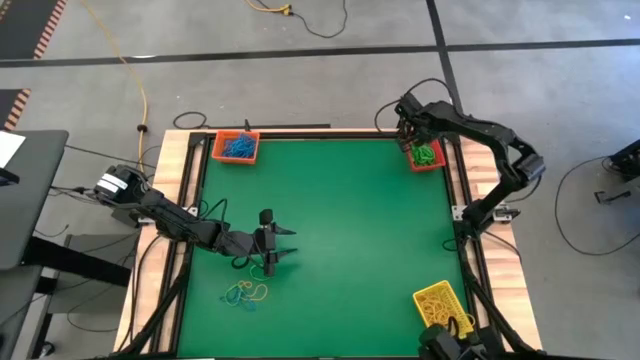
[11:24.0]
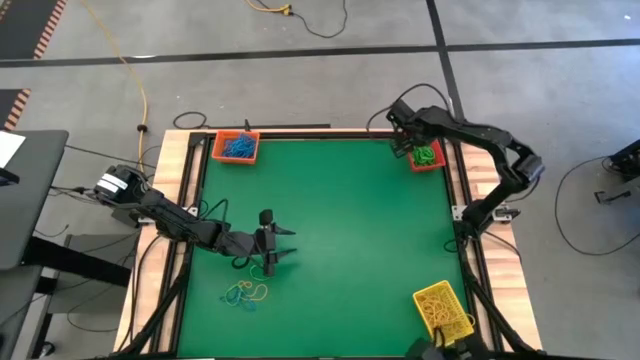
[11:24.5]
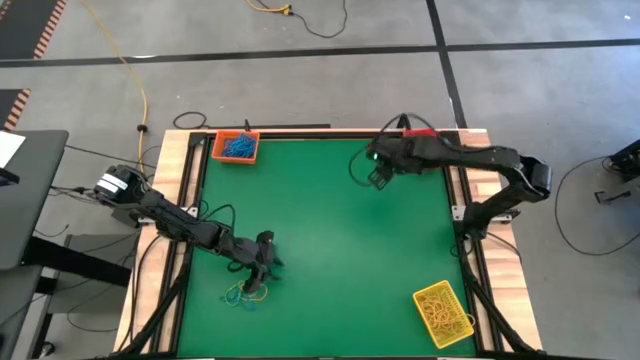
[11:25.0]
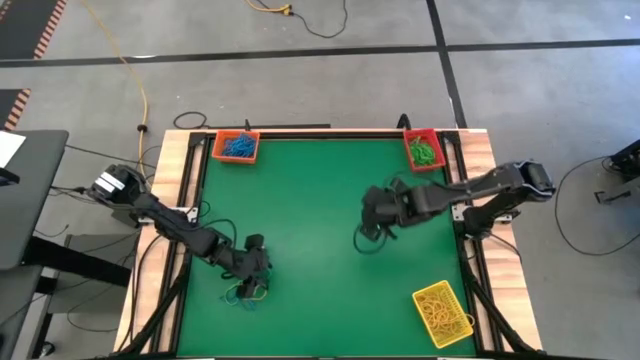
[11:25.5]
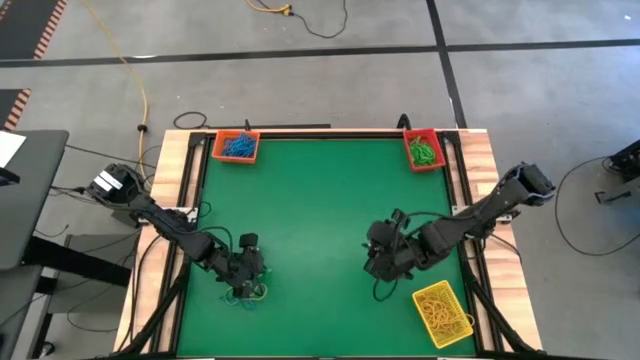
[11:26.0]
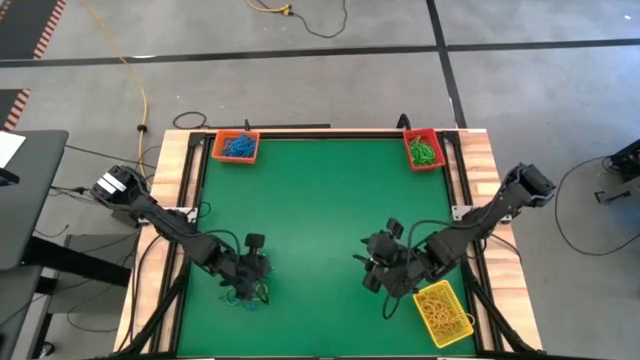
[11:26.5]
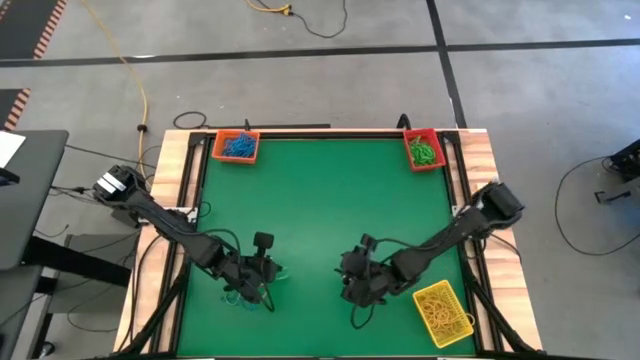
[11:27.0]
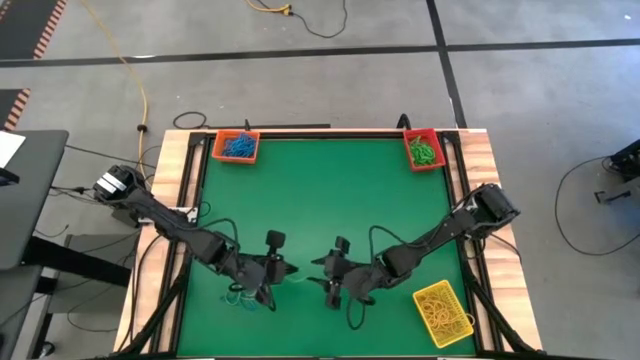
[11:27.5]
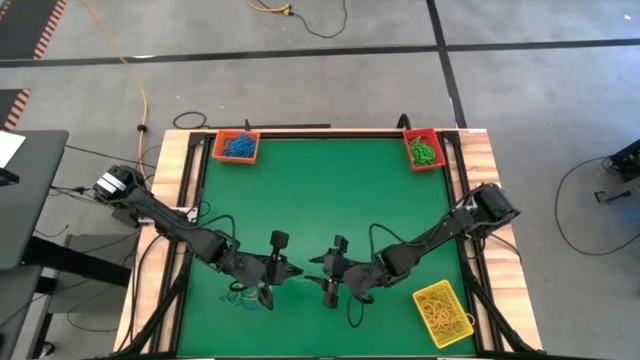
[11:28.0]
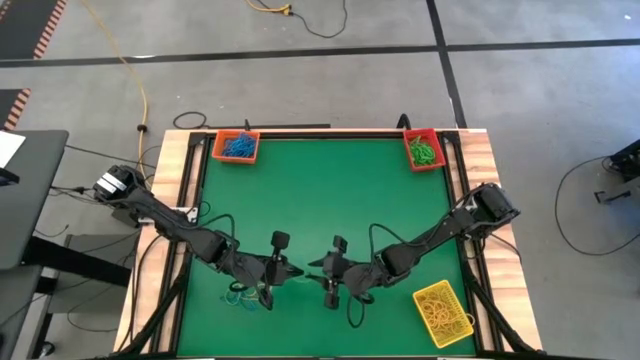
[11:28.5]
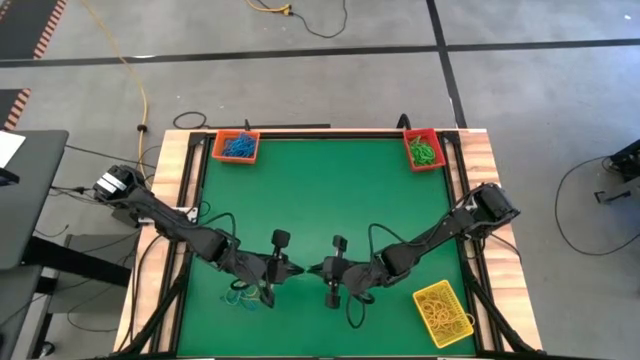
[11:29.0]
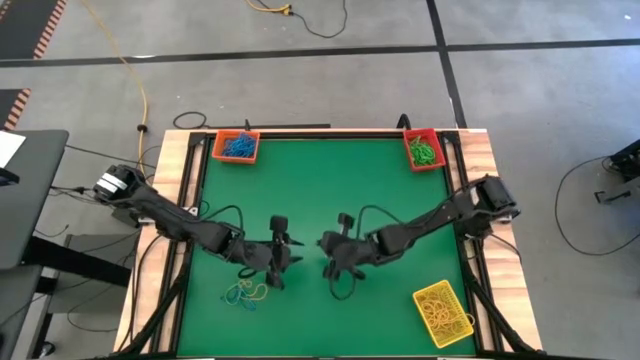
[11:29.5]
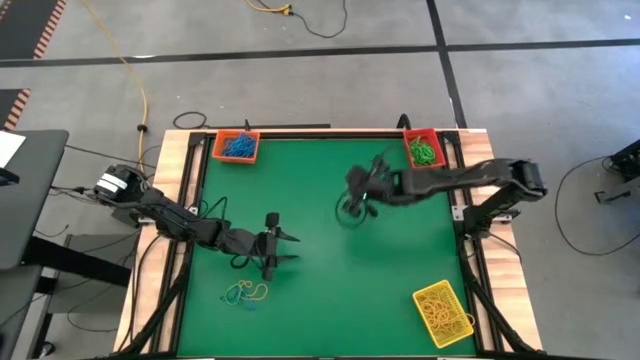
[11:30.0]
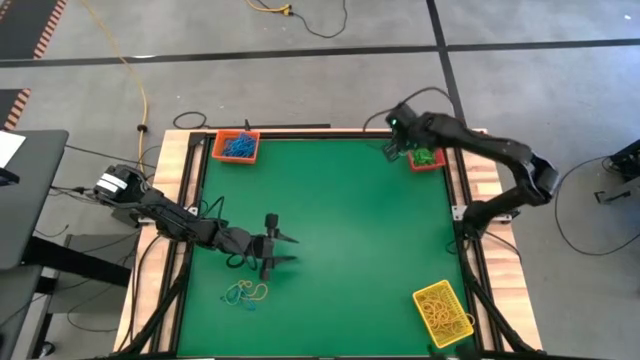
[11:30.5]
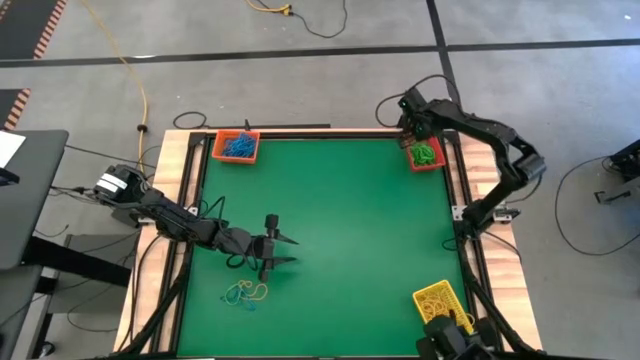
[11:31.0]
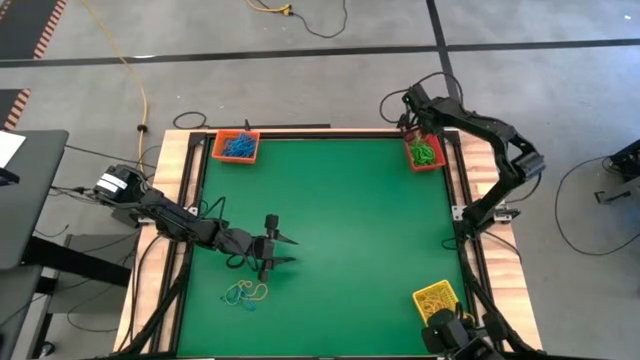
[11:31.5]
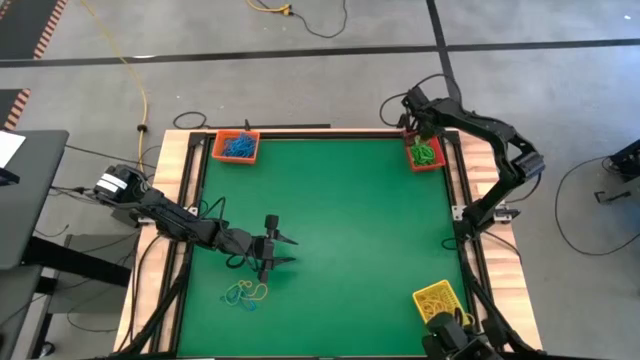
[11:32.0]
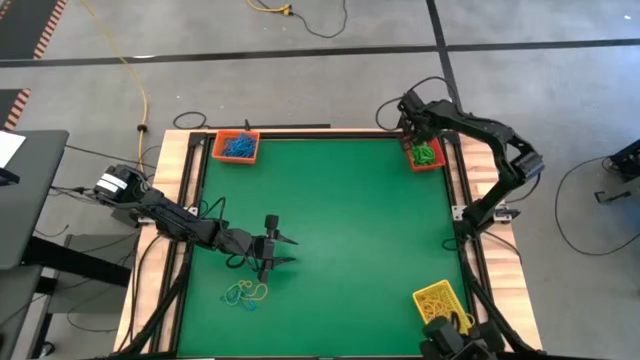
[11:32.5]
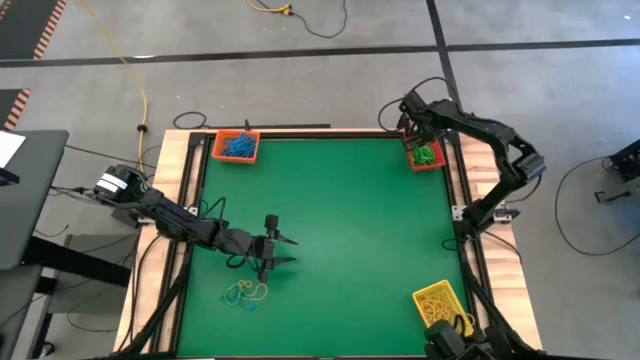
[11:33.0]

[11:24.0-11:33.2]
Task: Sort rubber bands into baskets
Put the left green rubber band into the red bin

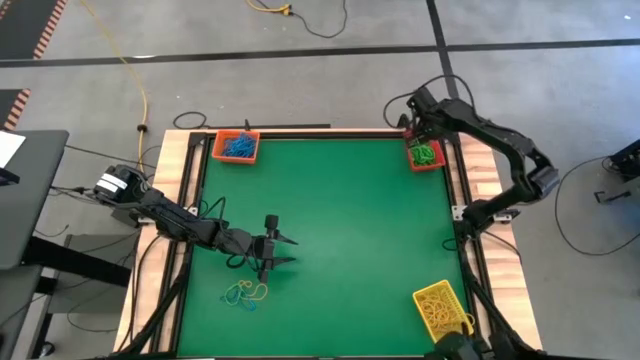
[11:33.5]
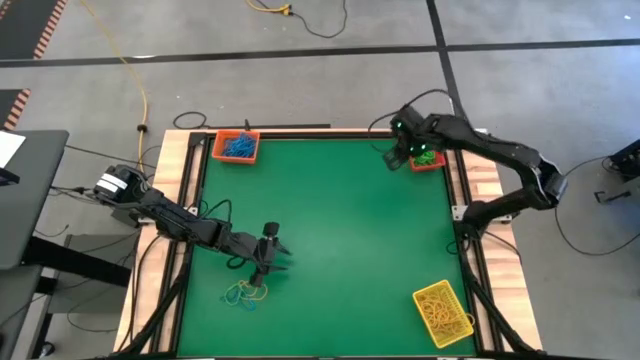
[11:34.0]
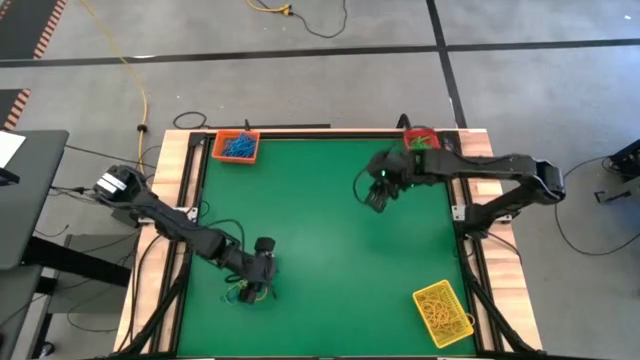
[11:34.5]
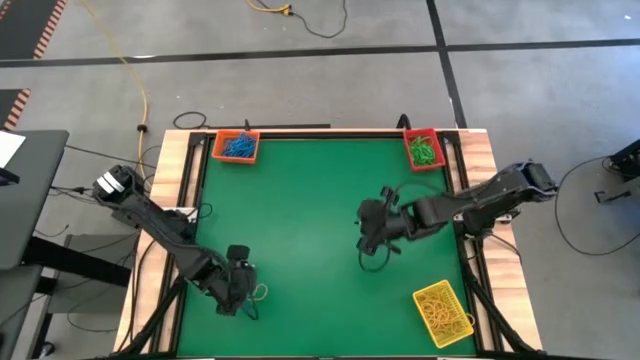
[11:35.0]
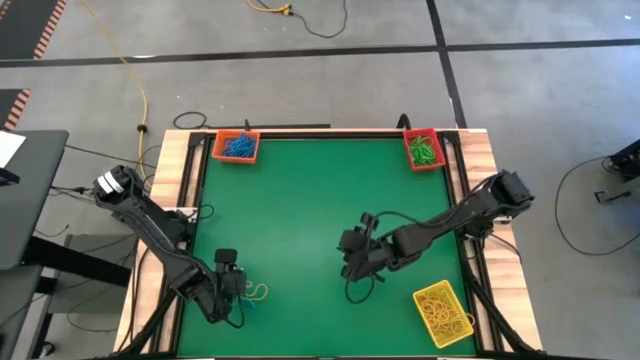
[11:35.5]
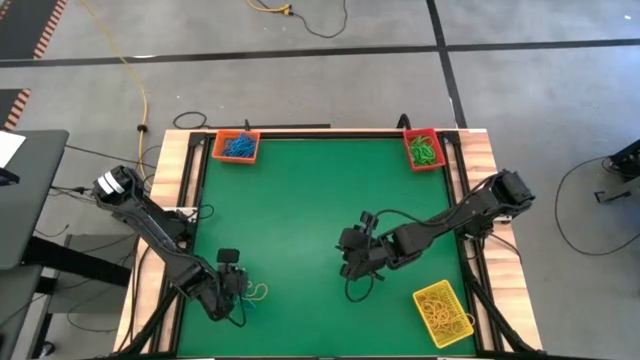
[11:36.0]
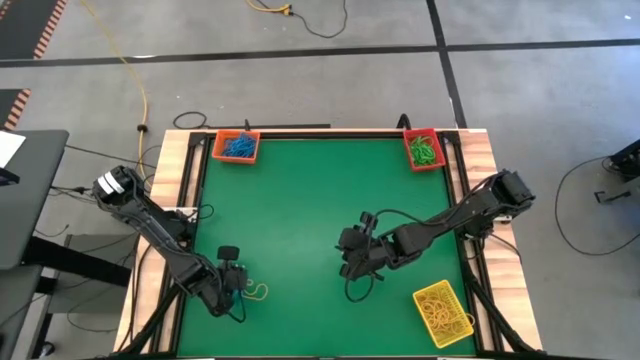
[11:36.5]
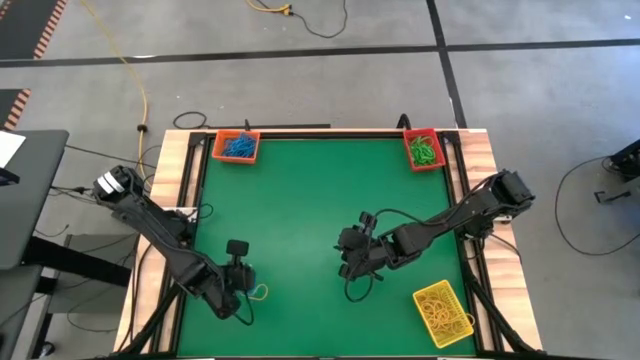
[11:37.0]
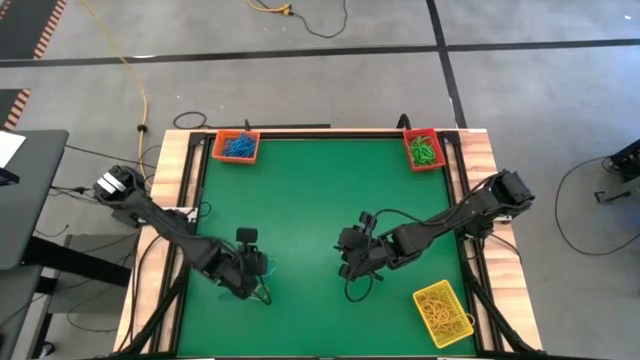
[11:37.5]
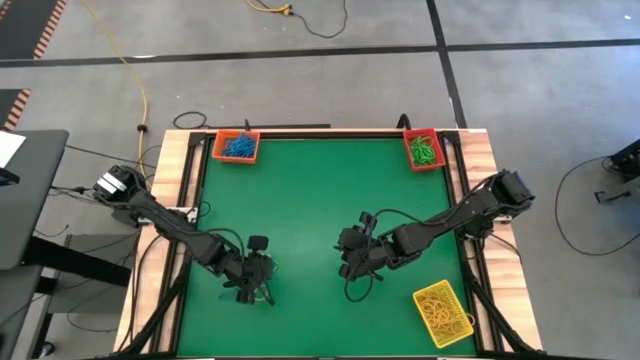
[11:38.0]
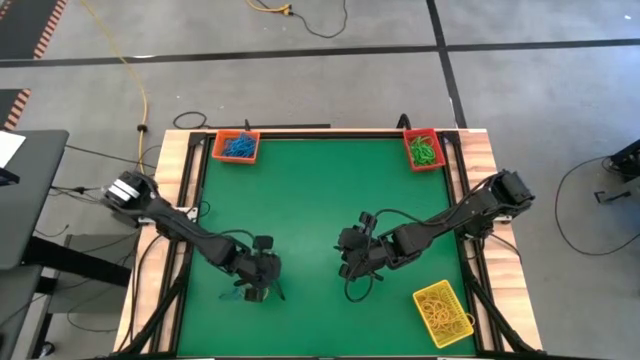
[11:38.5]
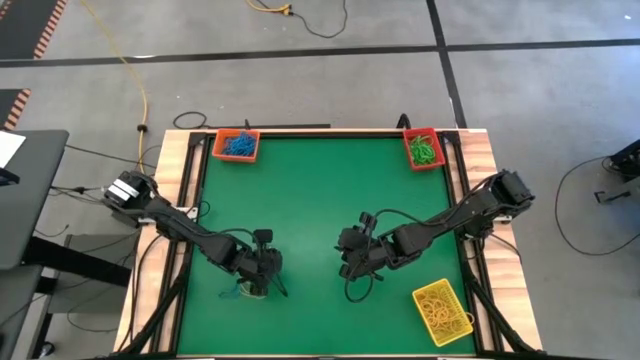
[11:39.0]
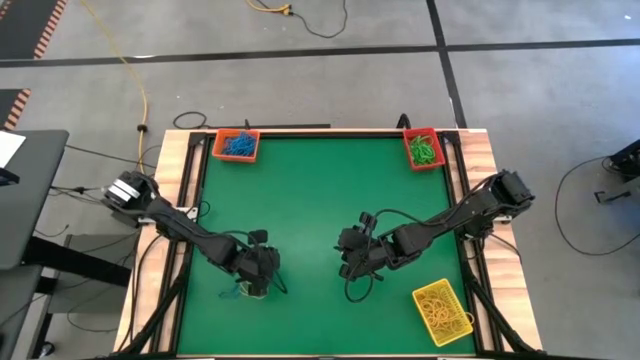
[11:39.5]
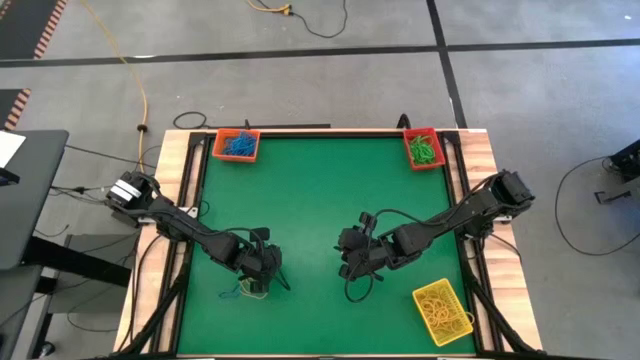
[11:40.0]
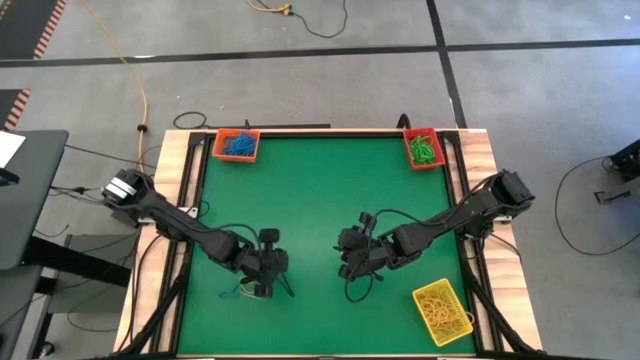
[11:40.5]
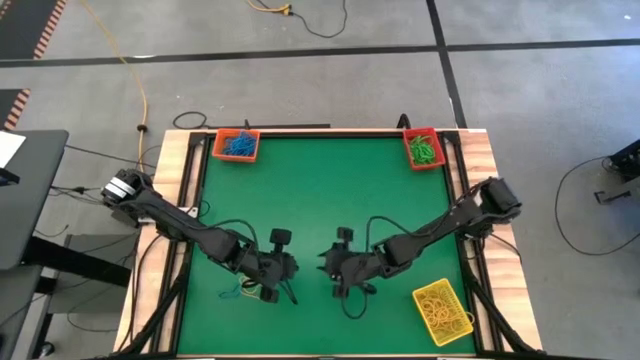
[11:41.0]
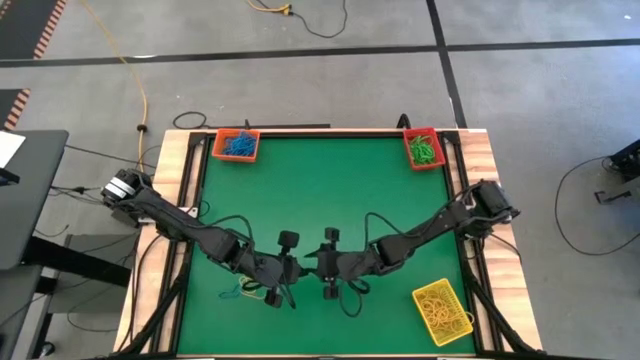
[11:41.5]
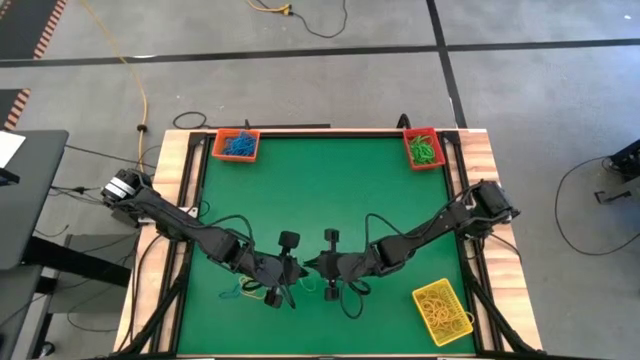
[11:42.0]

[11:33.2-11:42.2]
Put the green rubber band into the red bin

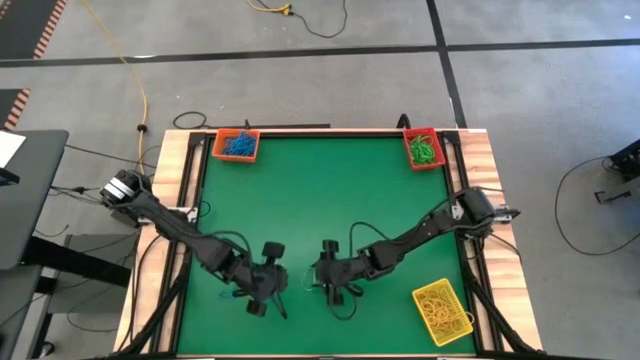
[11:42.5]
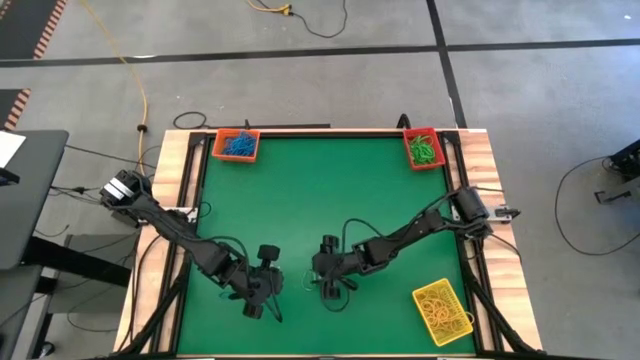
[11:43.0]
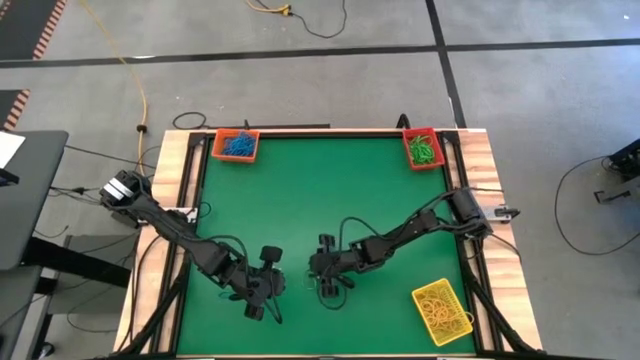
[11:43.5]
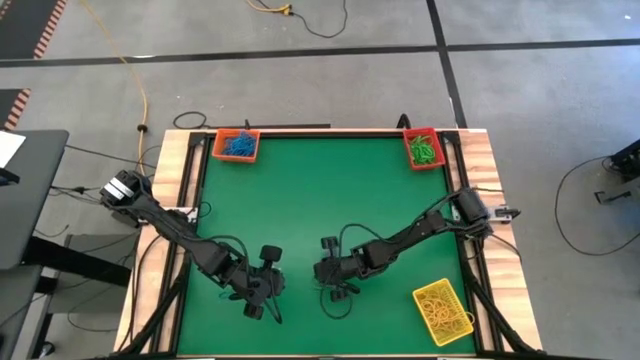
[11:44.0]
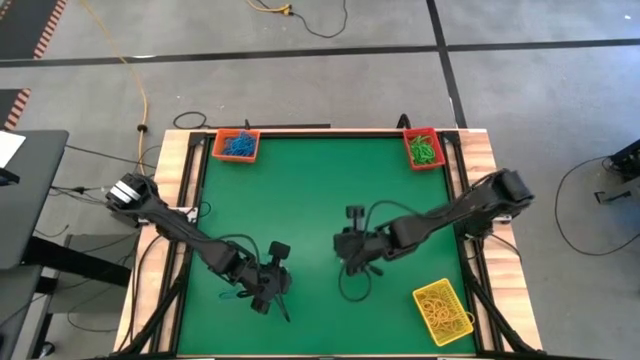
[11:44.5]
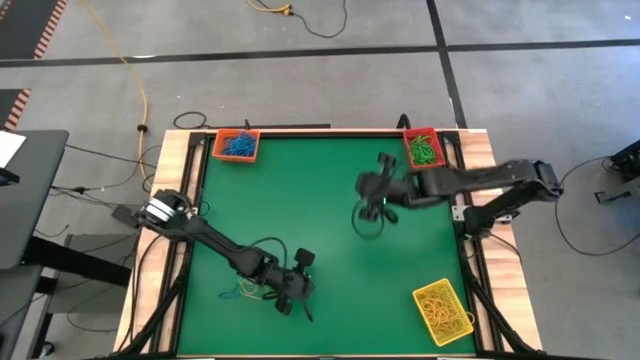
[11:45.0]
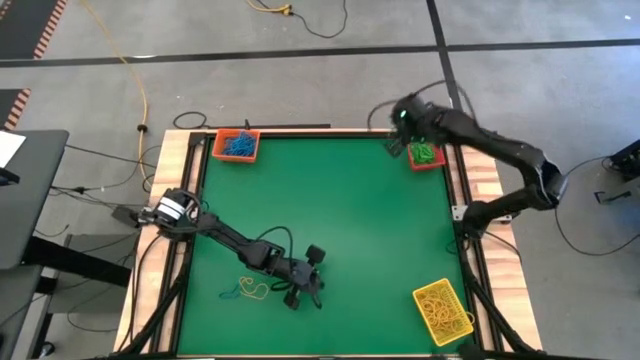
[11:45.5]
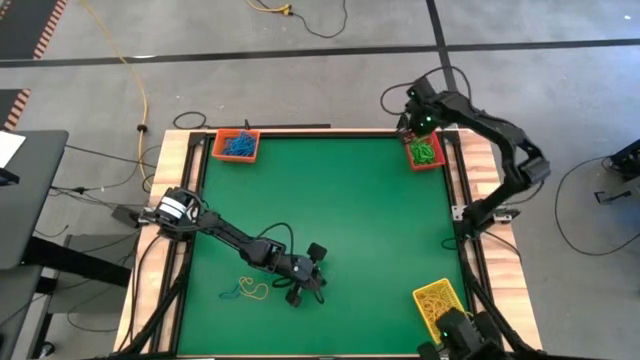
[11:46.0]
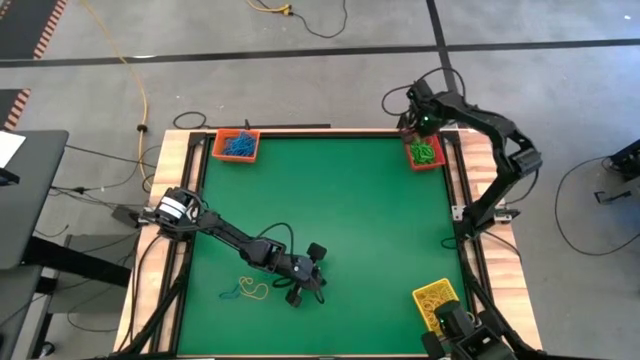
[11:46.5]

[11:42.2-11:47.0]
Put the green rubber band into the red bin
